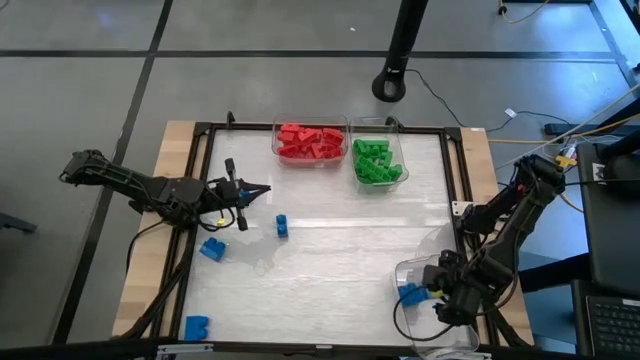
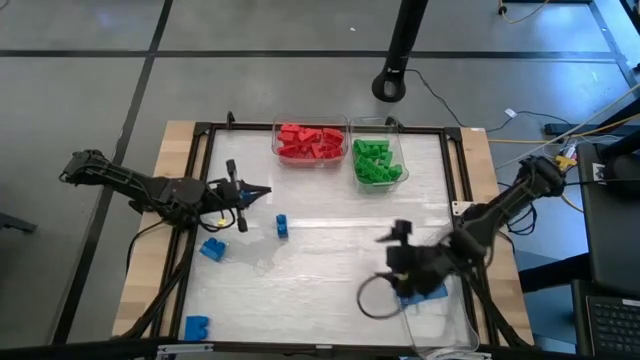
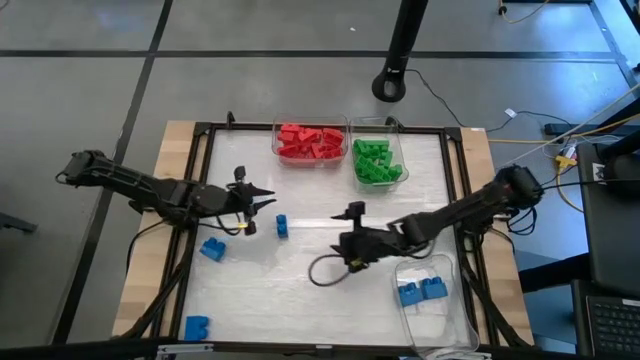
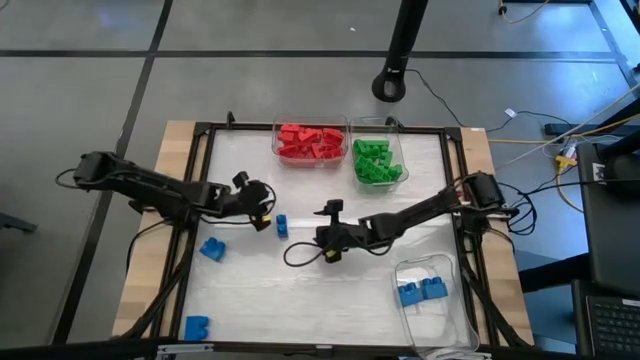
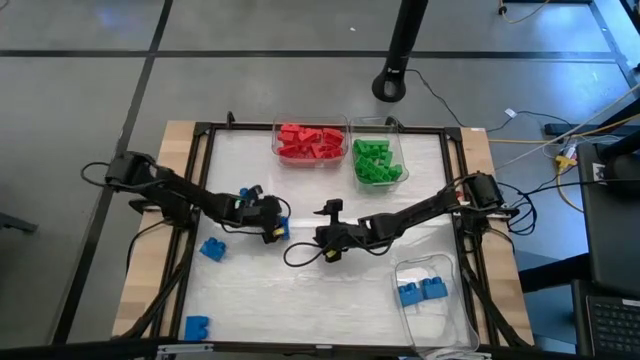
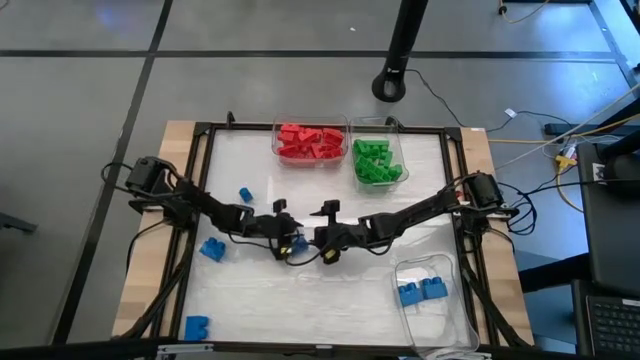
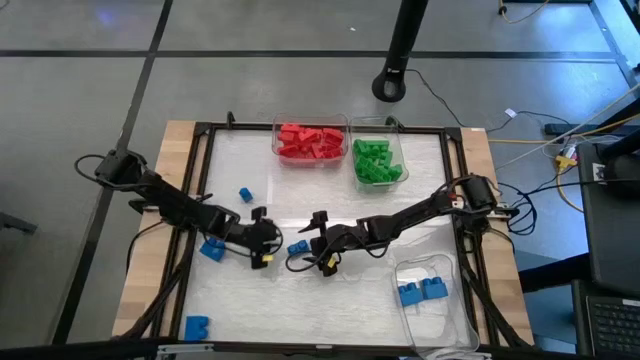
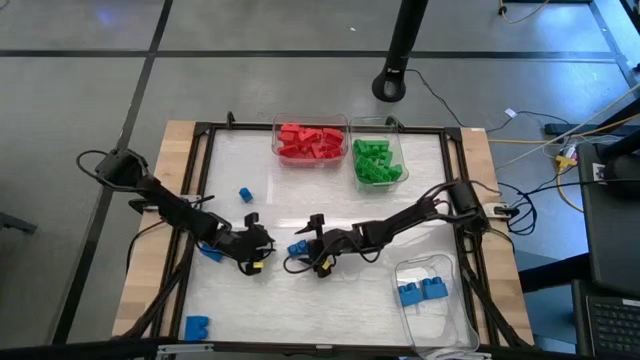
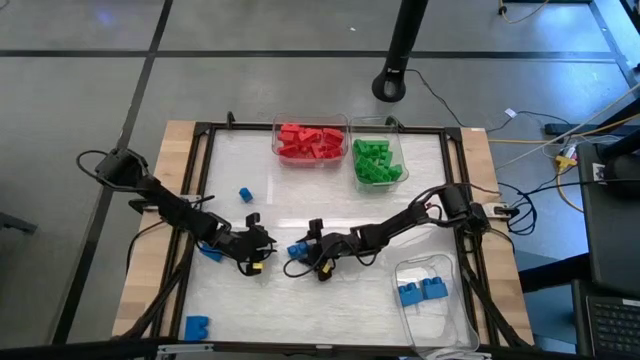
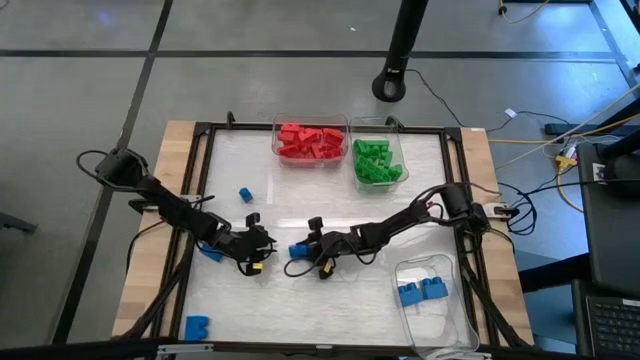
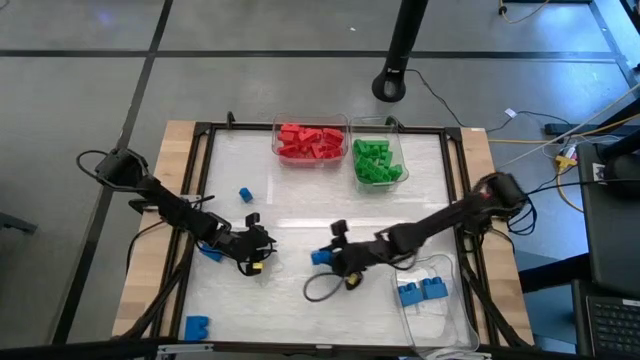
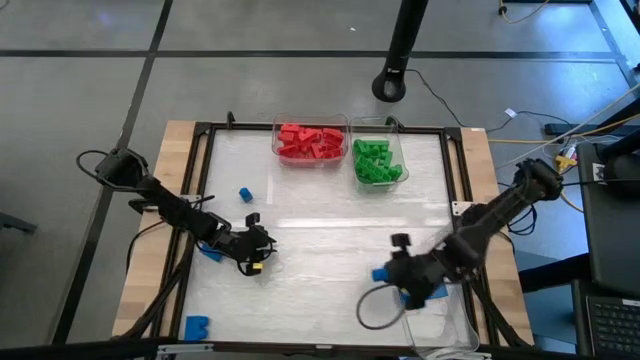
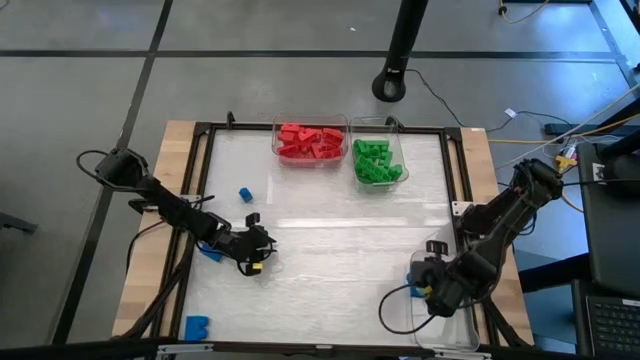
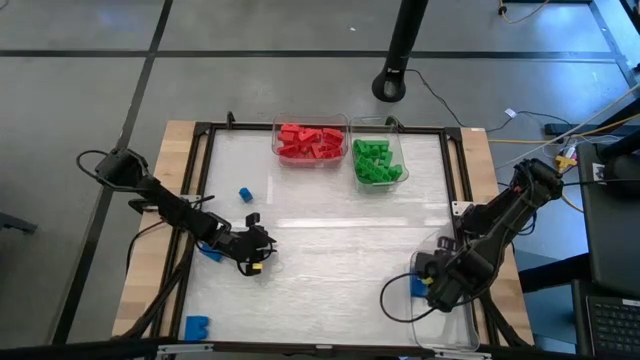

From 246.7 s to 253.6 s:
Task: Sort blocks
Put the blue game piece into the bottom transparent bin

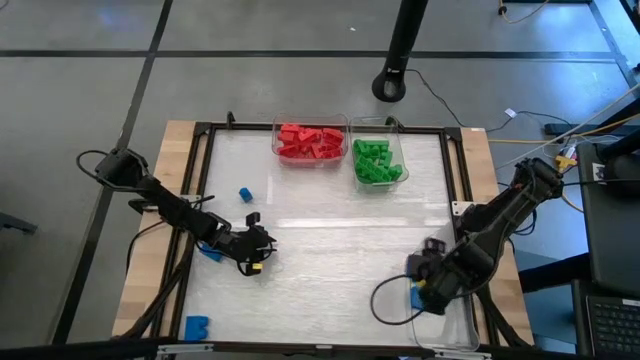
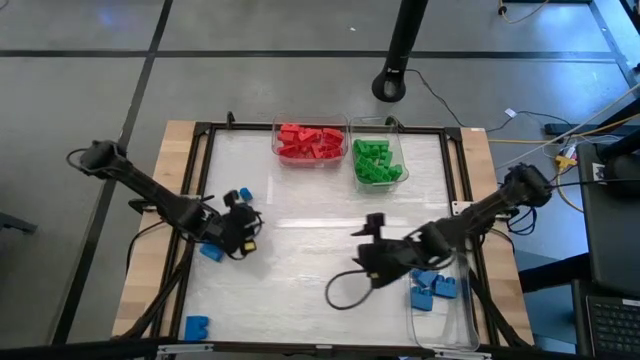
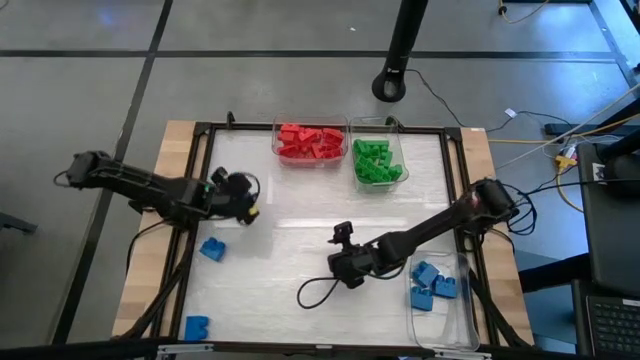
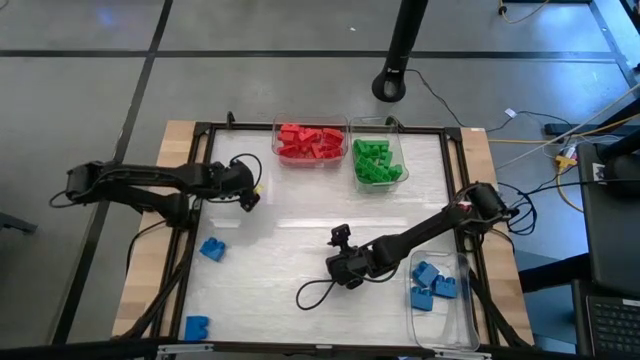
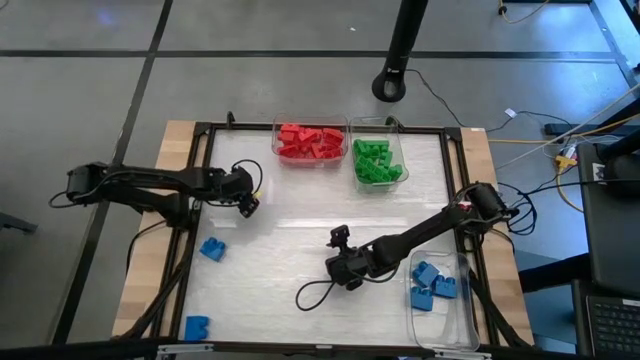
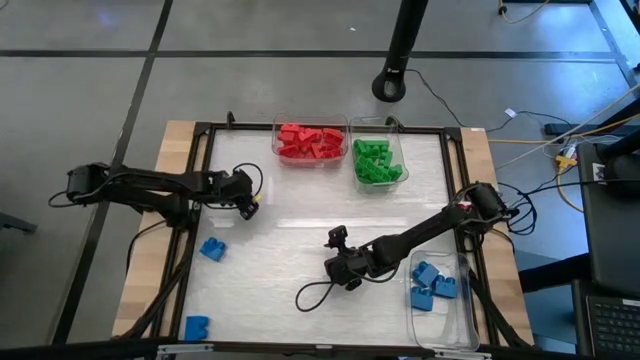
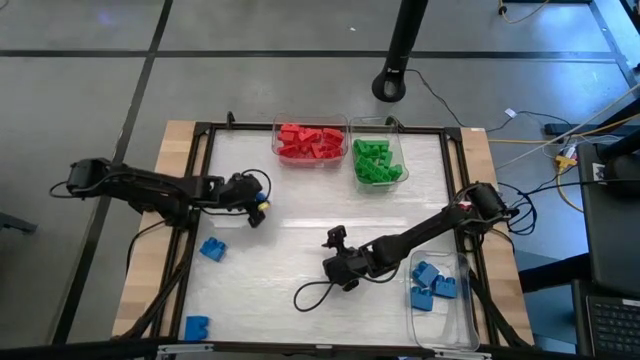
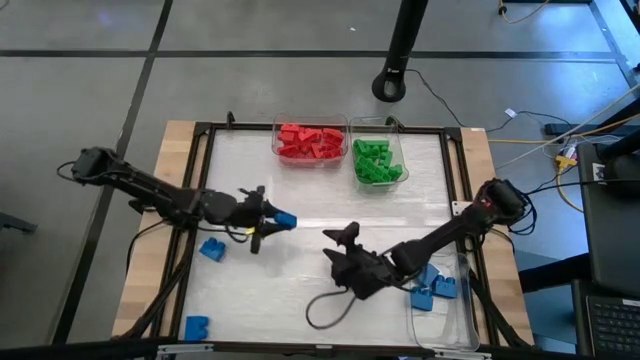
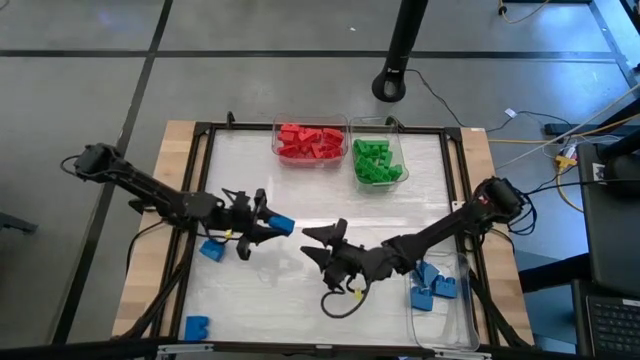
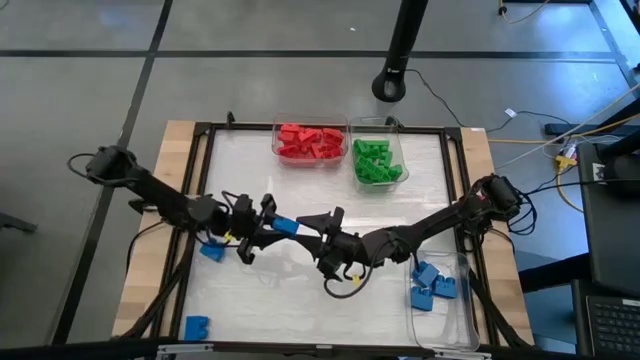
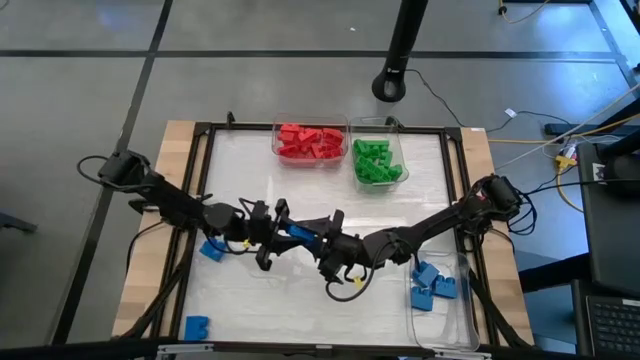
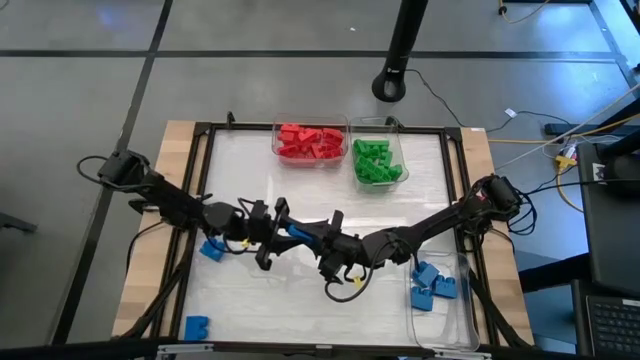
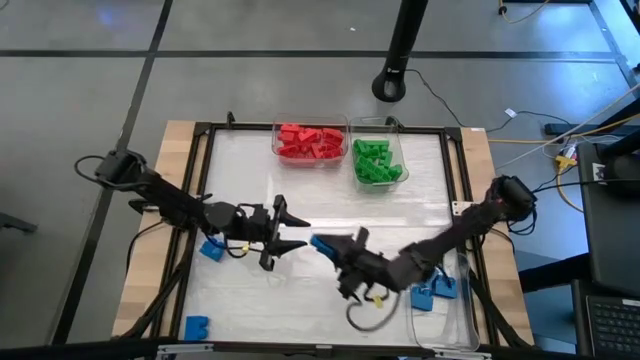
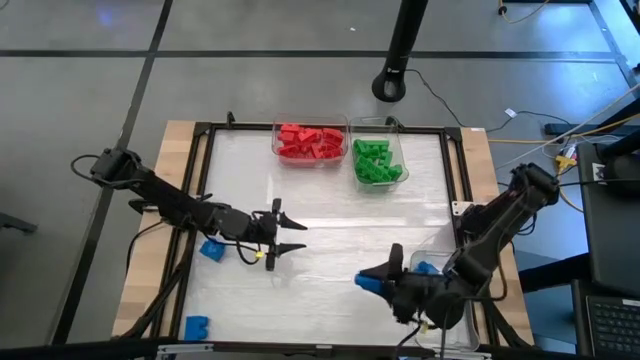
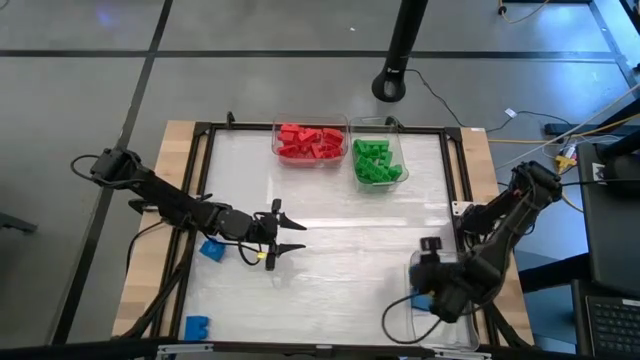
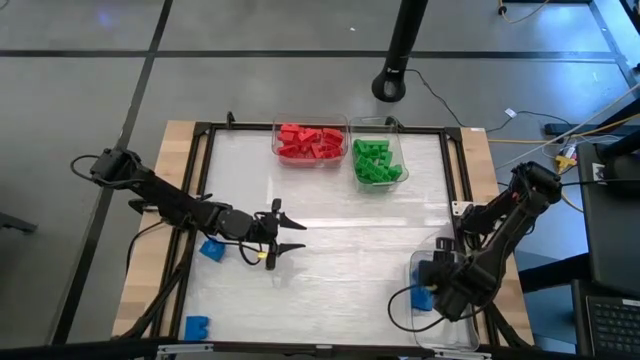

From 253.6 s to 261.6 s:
Put the blue game piece into the bottom transparent bin

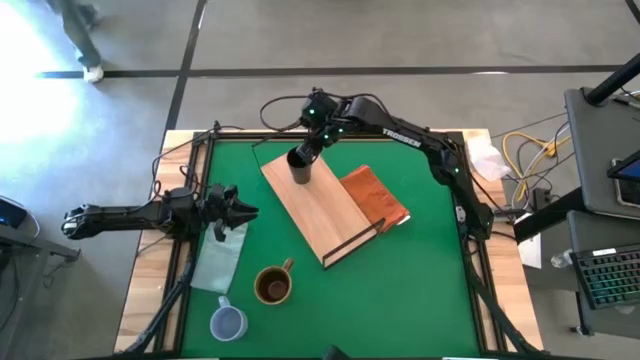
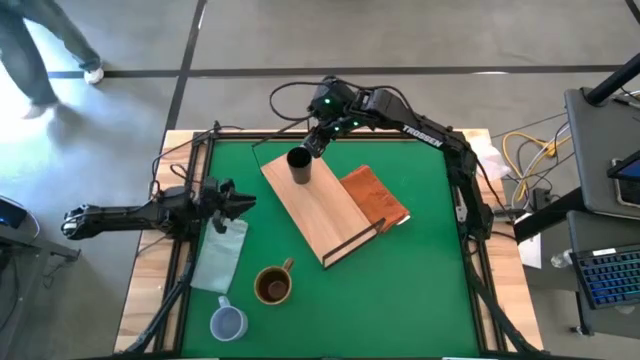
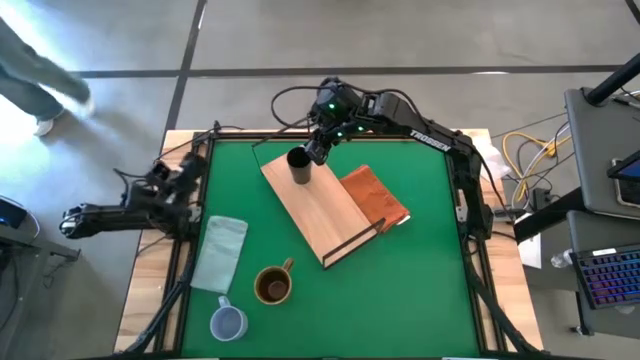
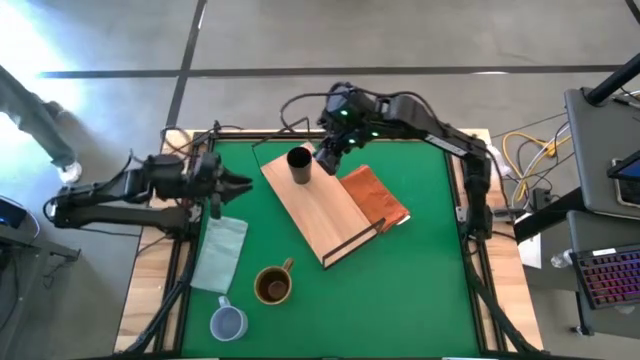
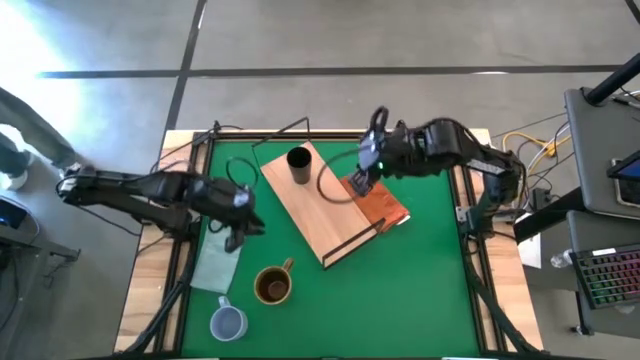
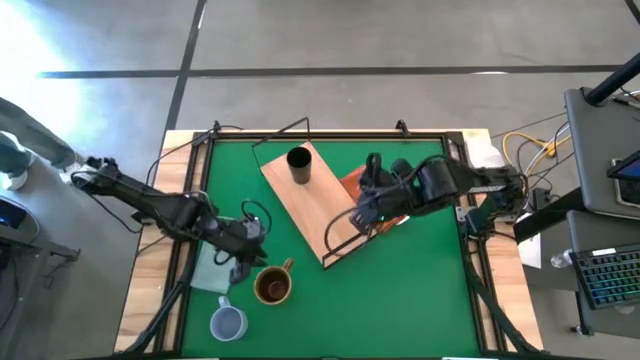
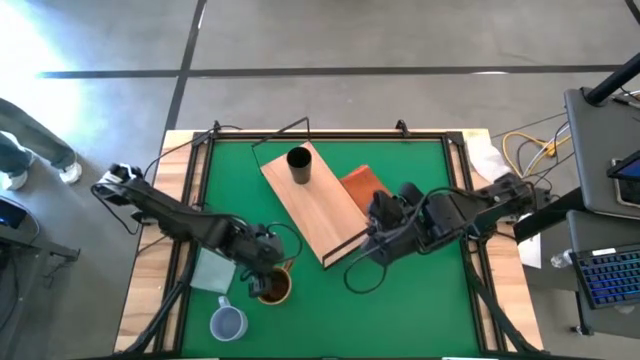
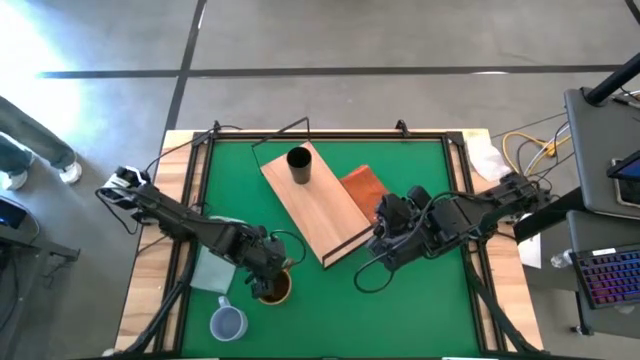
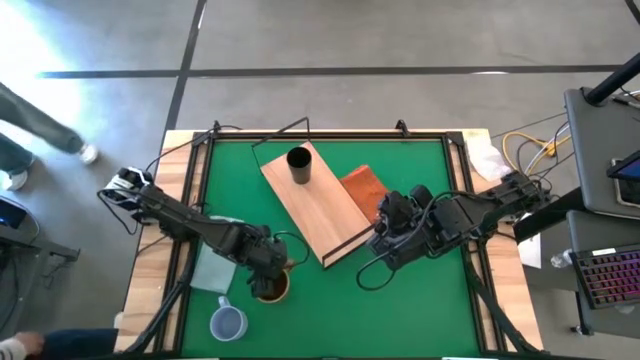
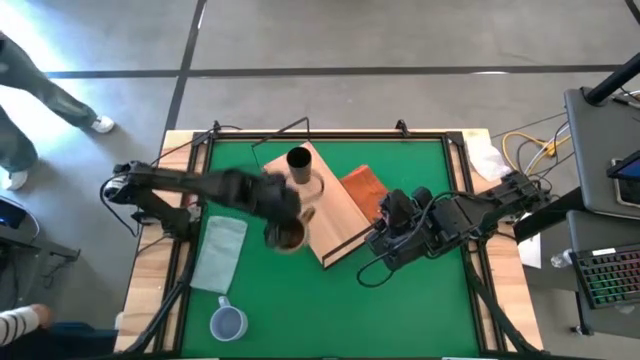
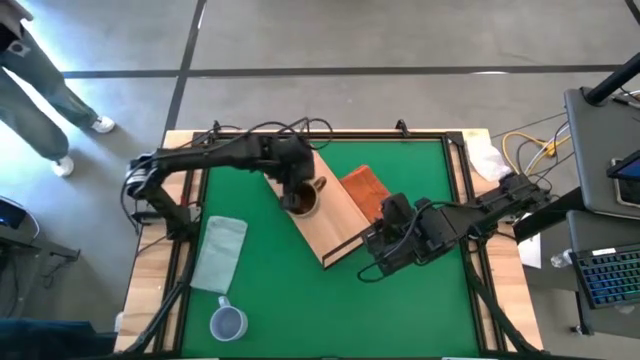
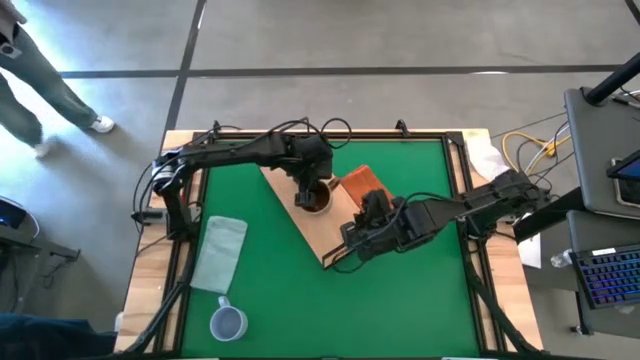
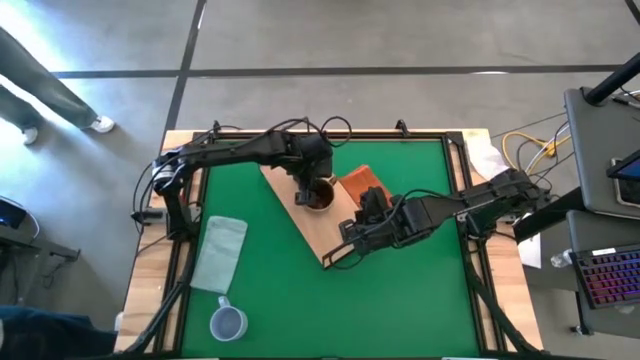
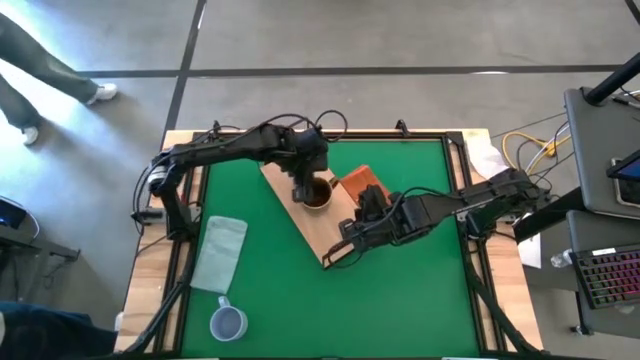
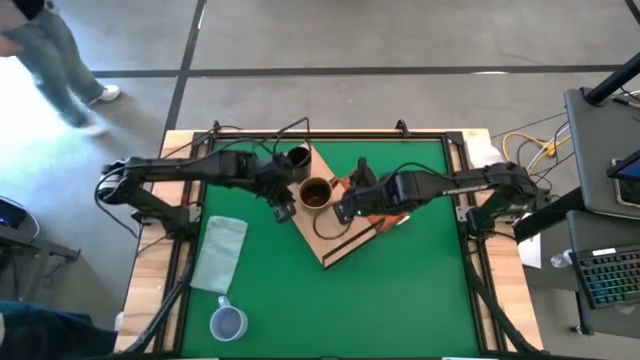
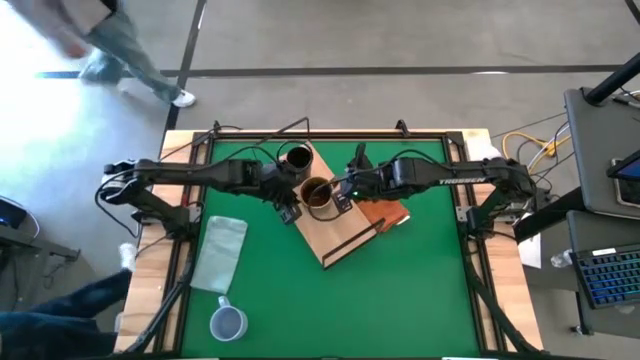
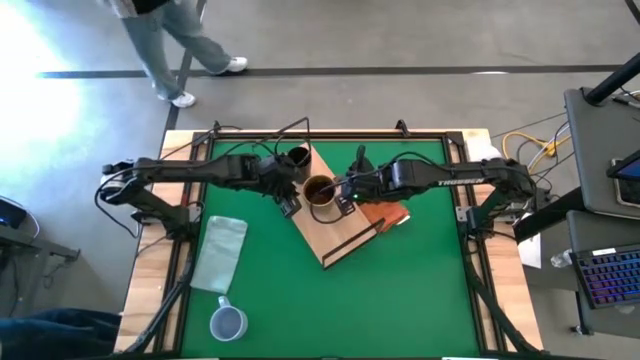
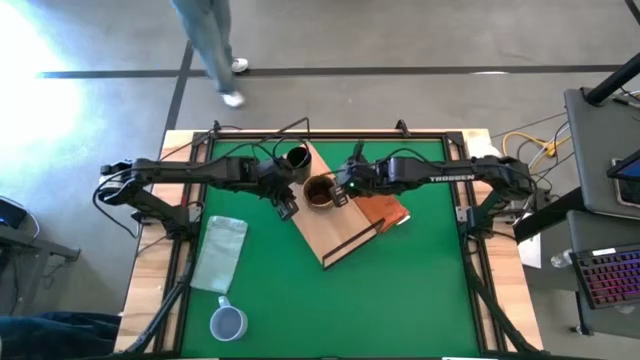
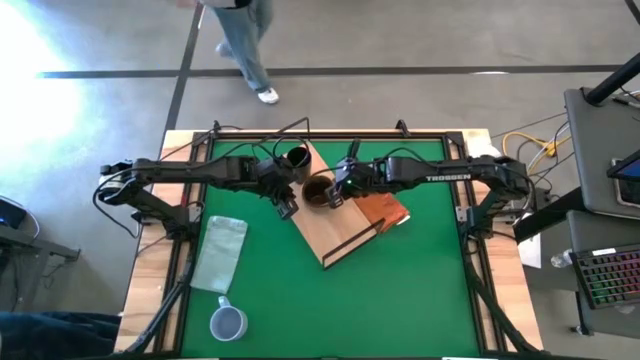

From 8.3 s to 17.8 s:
Task: Stack small to large cups/mugs on shelf
Put the brown mug on the shelf
